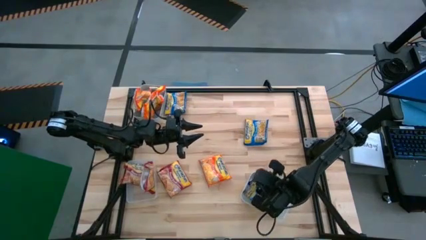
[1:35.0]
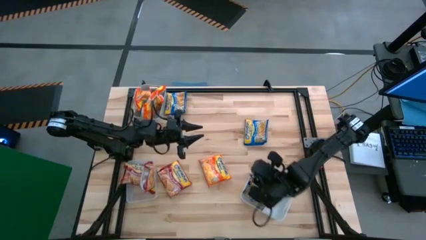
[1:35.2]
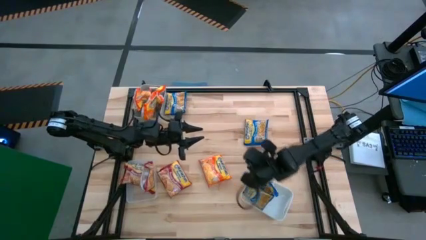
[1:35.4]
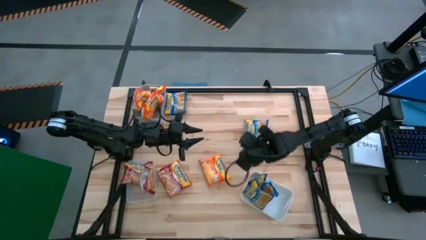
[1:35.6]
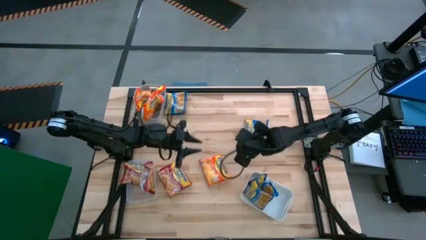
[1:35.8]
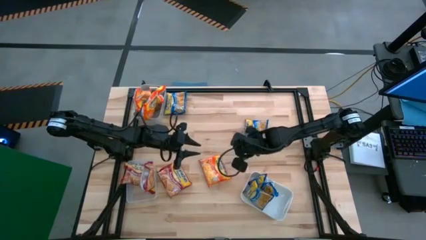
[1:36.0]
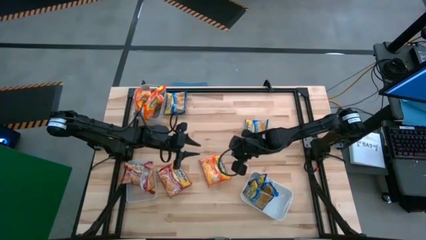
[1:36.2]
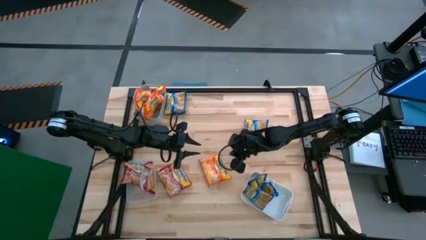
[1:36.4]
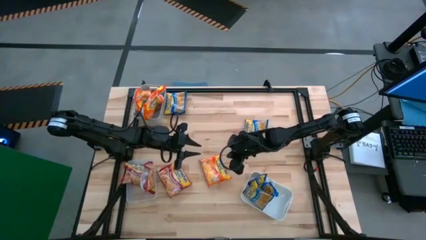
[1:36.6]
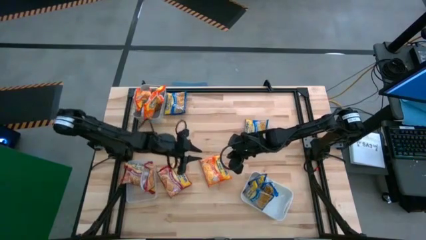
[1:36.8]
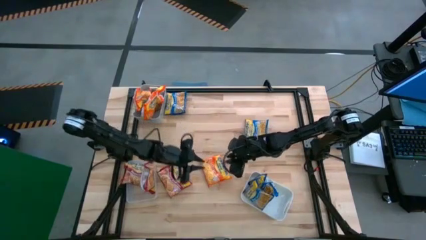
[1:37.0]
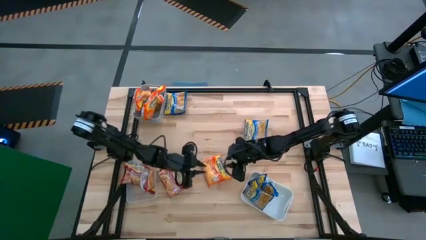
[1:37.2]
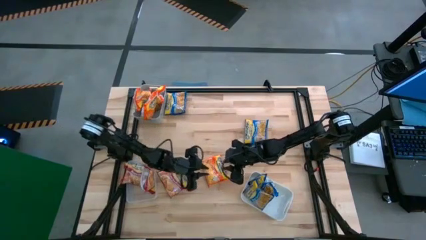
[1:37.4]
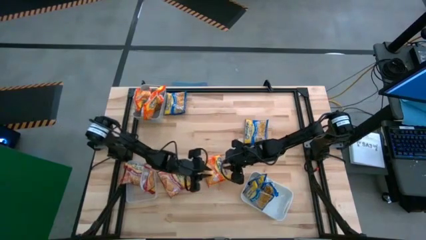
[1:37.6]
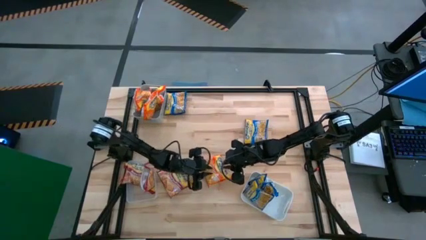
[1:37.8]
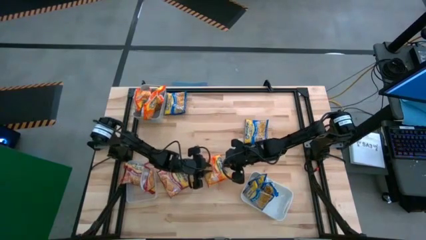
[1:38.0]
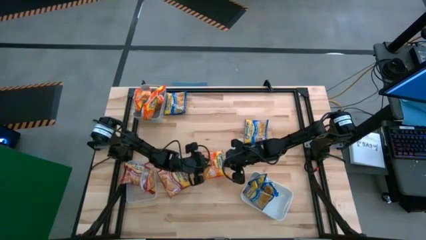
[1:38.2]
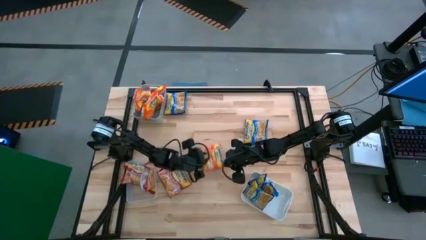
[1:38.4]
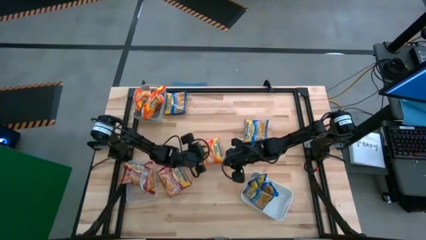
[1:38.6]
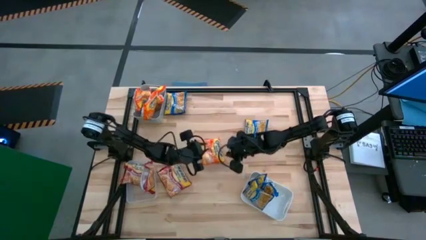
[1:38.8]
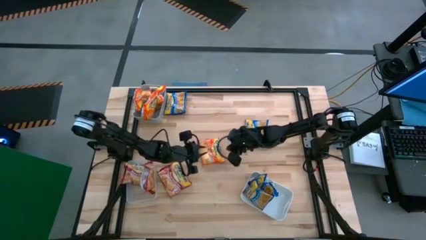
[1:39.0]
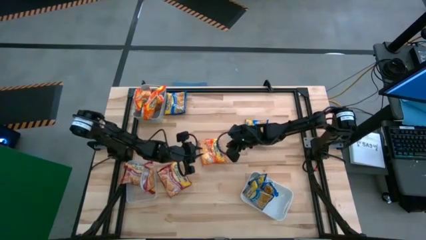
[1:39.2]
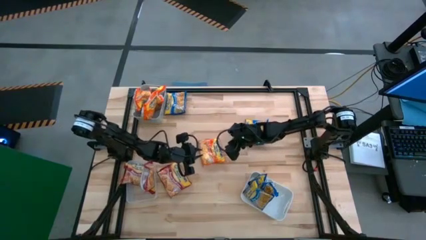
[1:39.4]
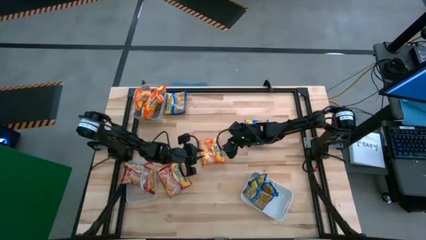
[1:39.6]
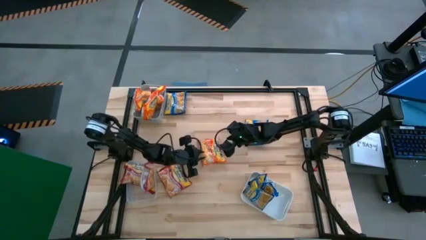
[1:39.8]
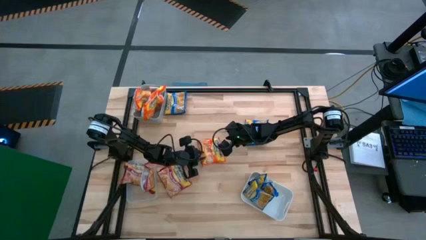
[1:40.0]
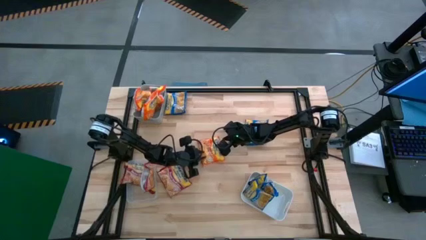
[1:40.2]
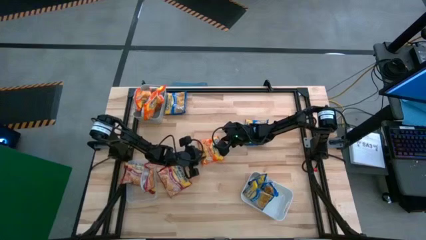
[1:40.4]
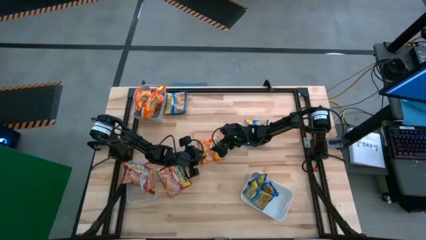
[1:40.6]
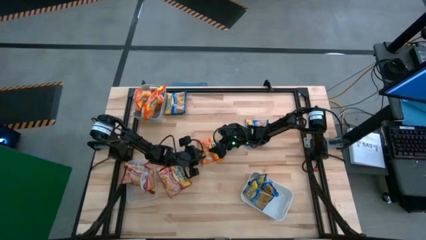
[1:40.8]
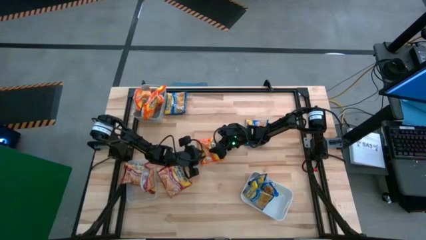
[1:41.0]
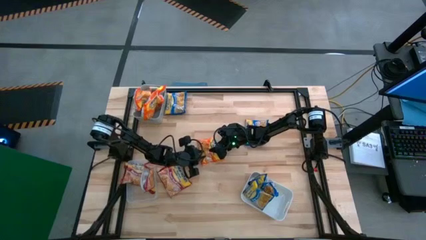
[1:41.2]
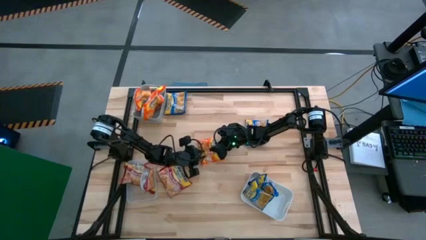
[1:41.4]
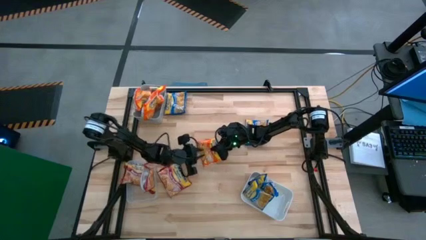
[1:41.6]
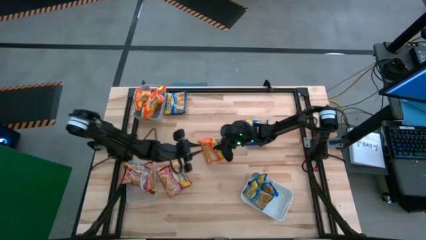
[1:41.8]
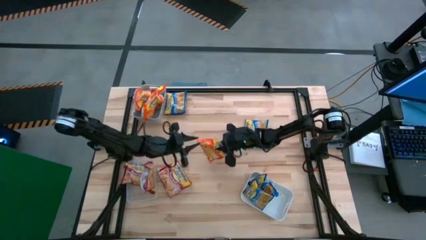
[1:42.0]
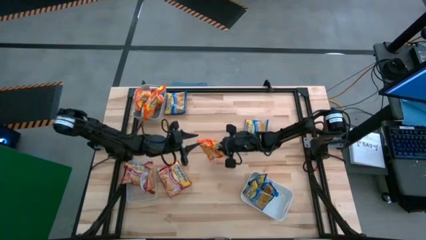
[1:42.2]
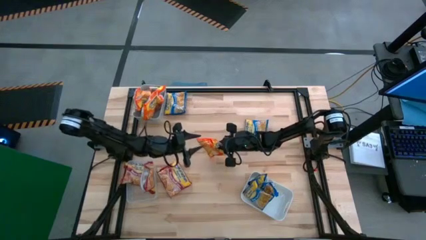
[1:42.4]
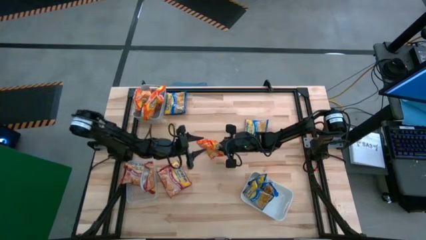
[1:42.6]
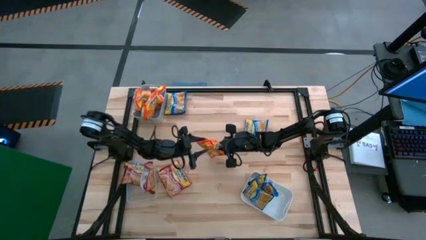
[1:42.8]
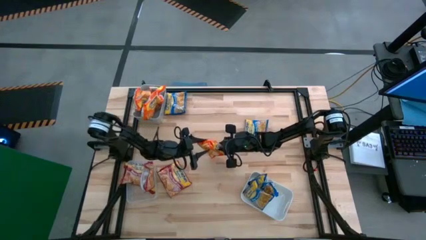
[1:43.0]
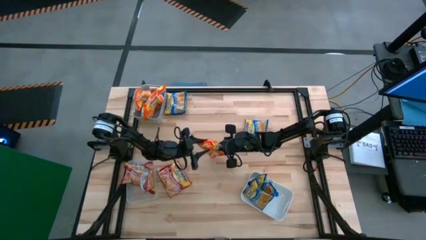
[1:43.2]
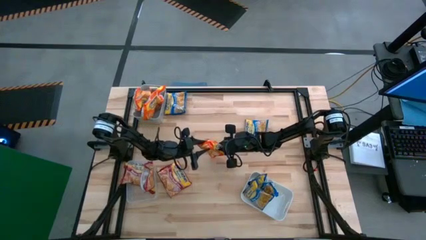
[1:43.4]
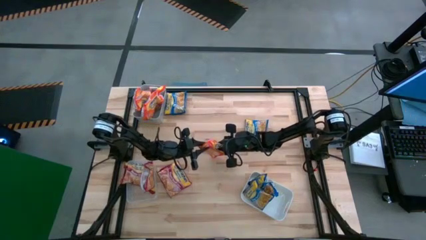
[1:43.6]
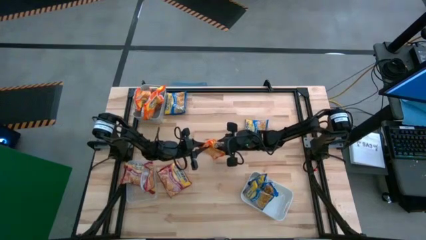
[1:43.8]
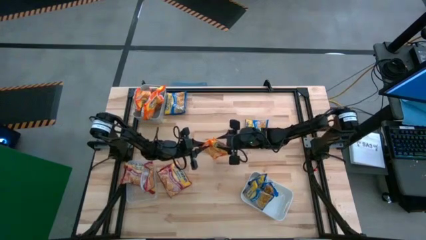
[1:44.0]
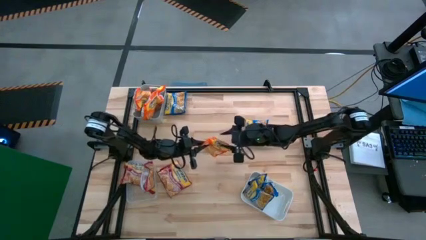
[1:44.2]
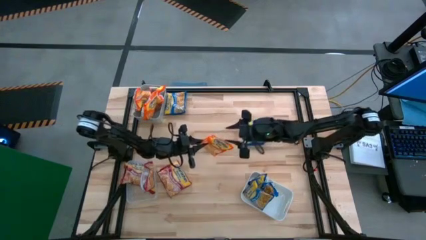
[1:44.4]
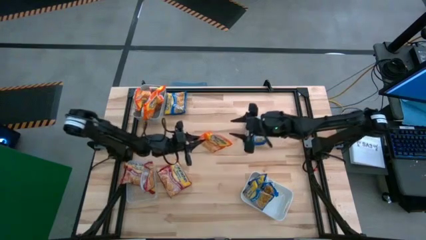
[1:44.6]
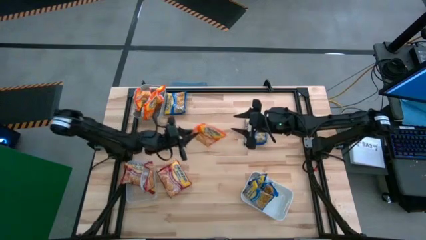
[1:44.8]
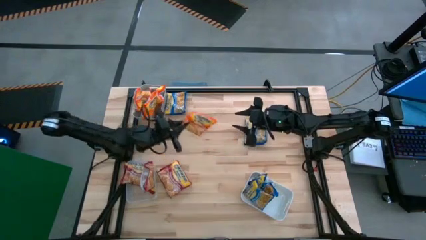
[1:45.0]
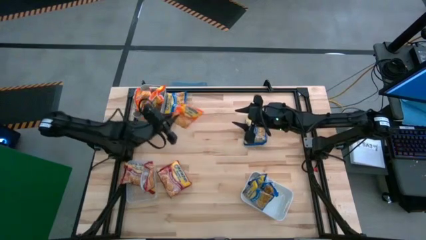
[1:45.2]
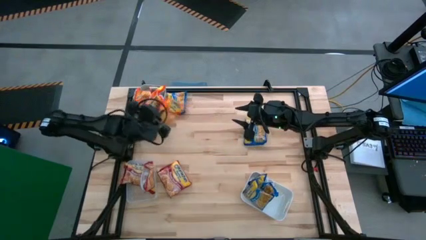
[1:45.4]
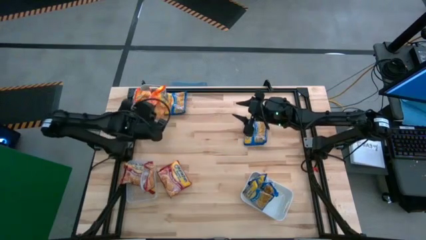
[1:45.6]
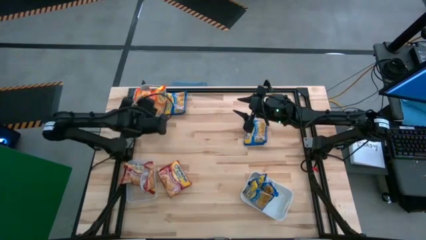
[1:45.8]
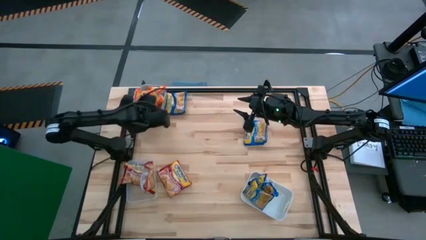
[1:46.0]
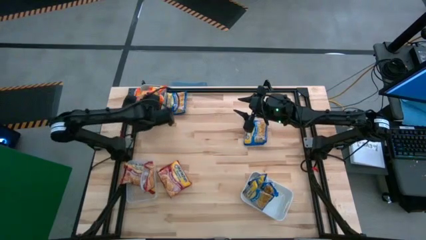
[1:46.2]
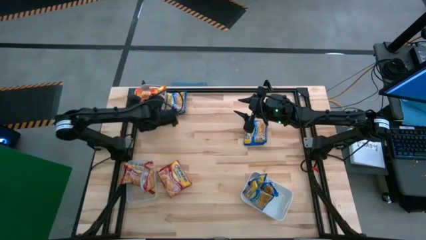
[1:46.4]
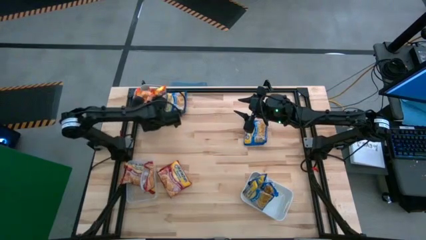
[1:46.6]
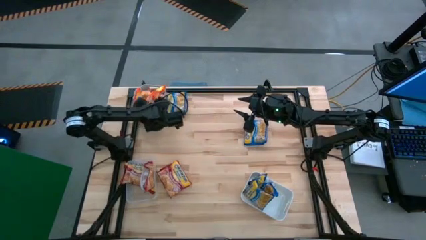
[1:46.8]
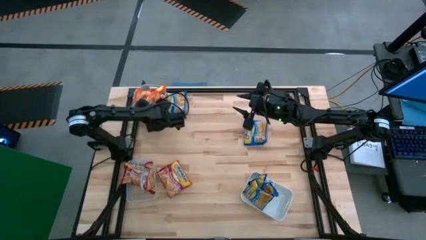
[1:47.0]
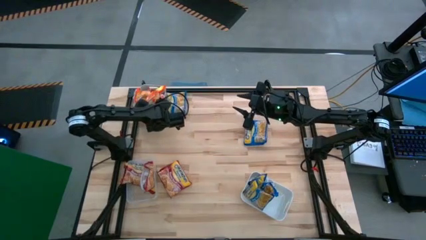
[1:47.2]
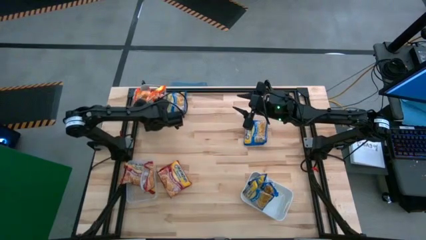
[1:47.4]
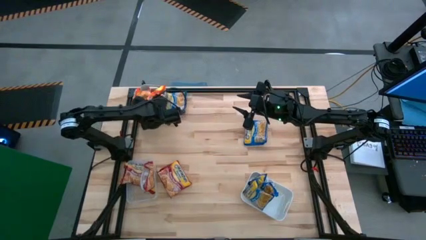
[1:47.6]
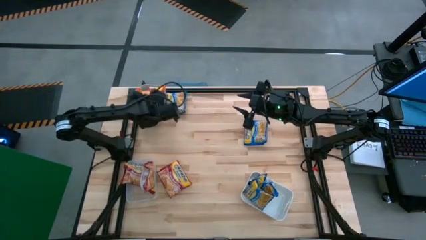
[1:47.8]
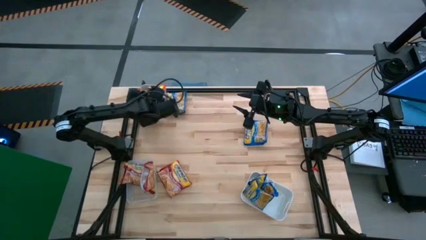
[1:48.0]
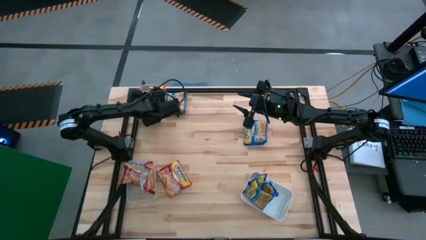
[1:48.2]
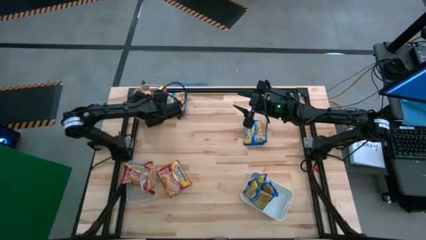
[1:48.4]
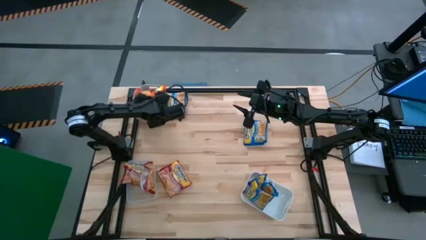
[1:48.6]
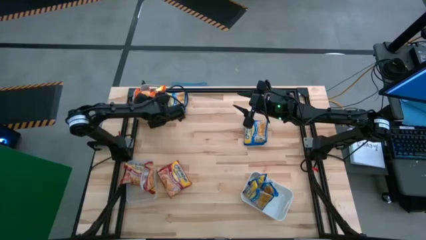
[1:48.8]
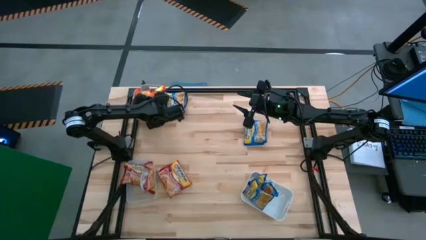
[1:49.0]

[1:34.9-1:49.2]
Task: Sort Maruchan noodles
Put the orange noodle pack into the gray bin

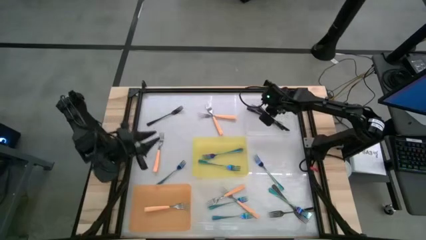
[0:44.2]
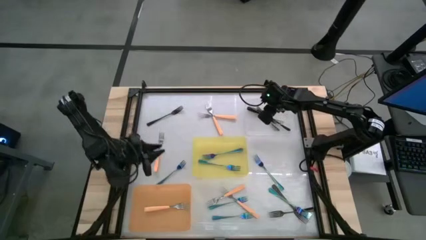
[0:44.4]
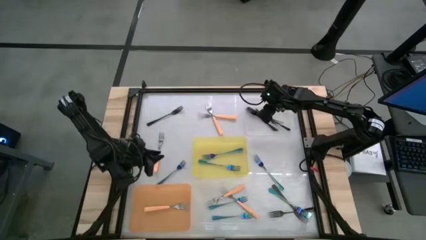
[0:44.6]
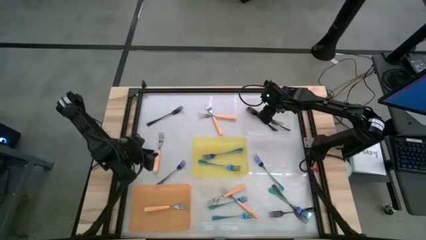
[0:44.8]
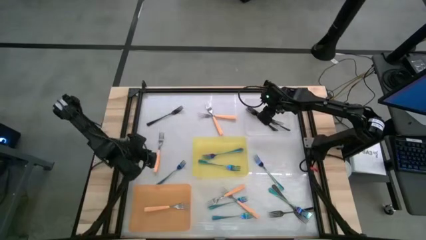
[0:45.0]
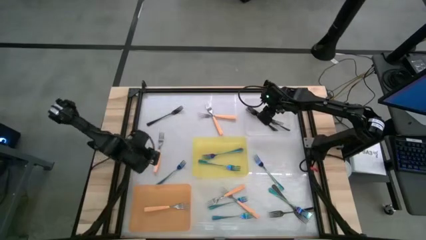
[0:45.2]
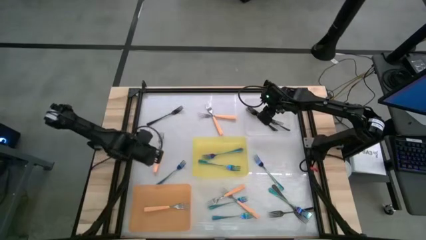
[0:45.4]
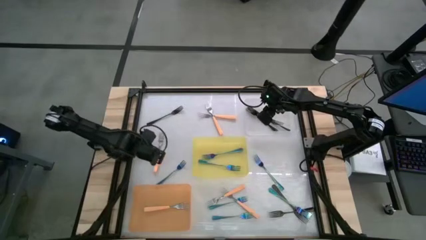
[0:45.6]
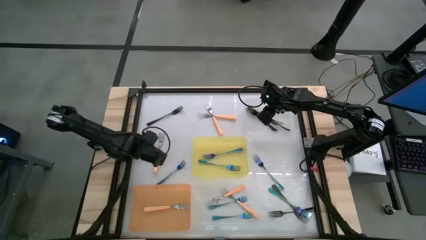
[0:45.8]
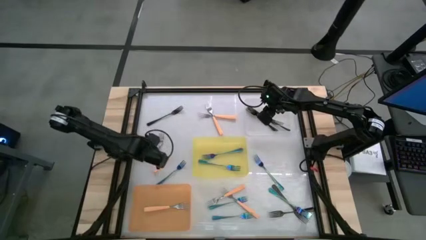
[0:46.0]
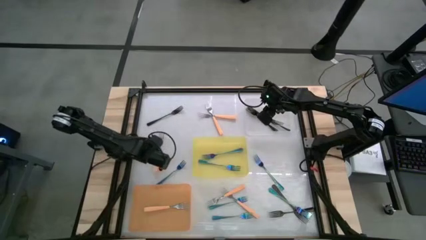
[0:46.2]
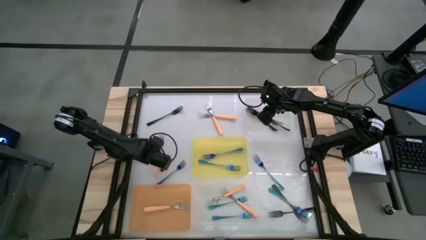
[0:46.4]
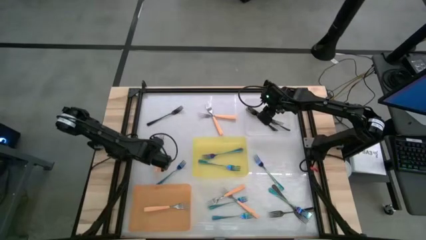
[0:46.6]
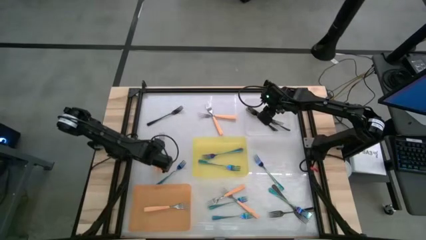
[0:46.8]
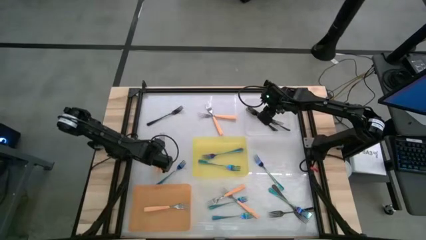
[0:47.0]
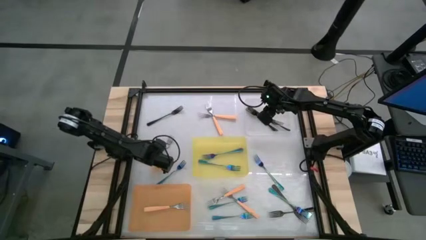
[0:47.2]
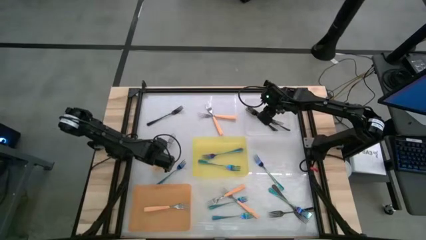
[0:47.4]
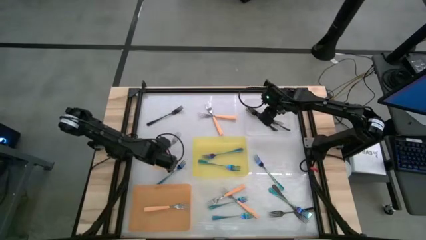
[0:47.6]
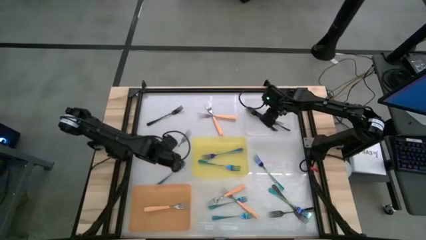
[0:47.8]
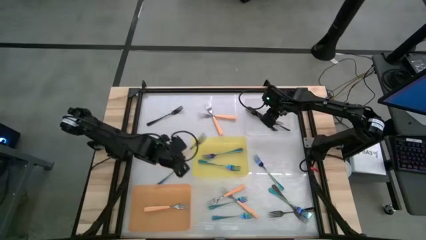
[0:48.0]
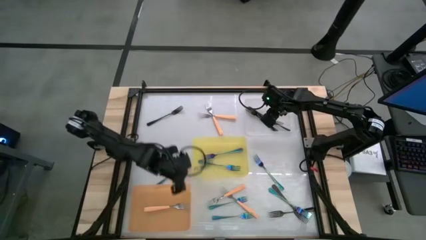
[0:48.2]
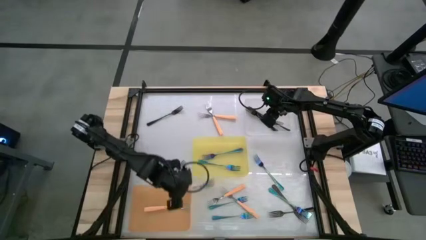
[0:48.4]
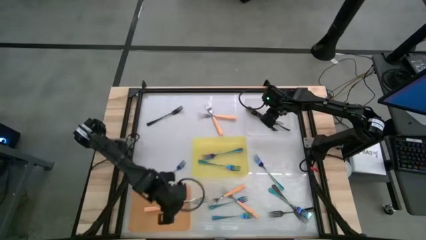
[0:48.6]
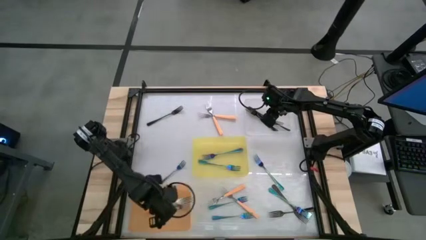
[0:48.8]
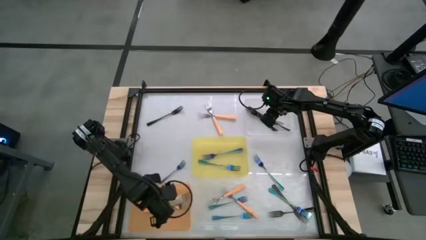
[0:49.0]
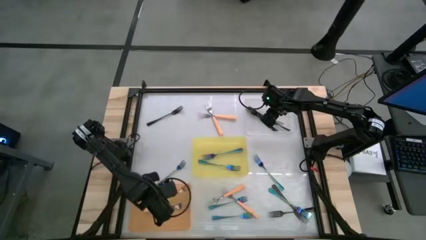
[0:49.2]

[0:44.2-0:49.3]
Task: Sort silverware by color (type)
Put the orange fork into the orange bin
